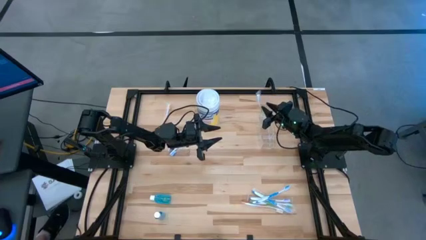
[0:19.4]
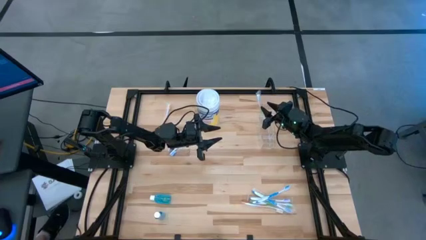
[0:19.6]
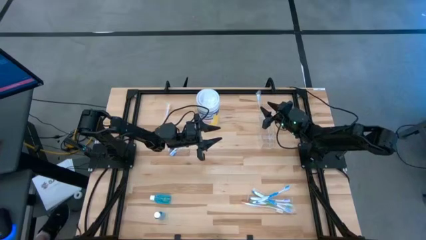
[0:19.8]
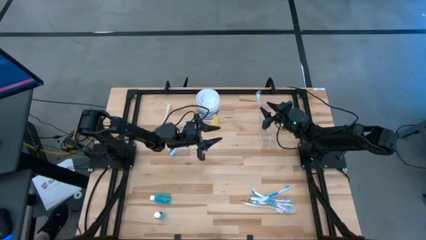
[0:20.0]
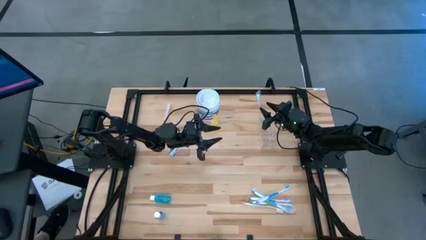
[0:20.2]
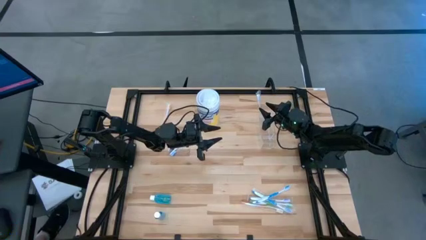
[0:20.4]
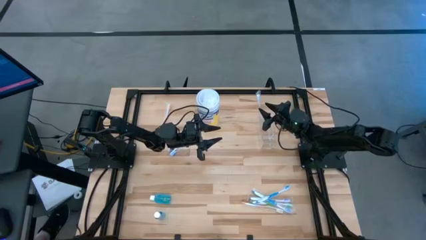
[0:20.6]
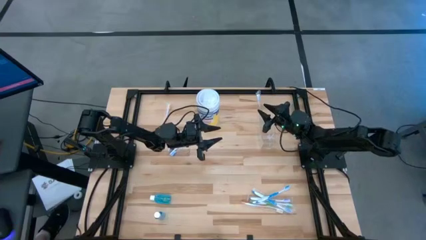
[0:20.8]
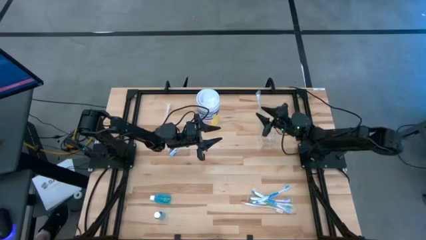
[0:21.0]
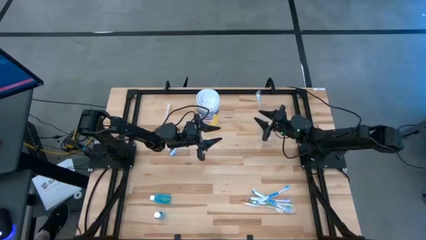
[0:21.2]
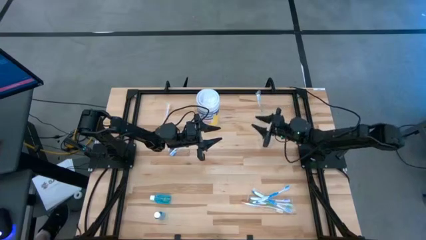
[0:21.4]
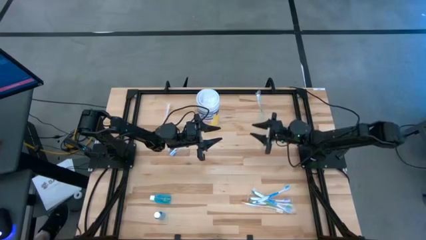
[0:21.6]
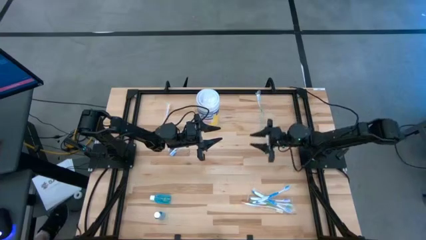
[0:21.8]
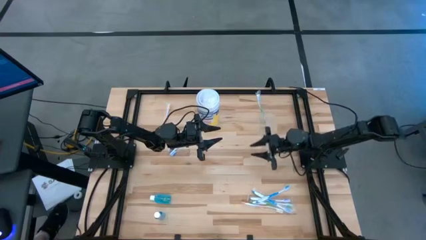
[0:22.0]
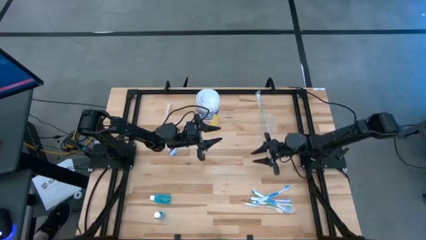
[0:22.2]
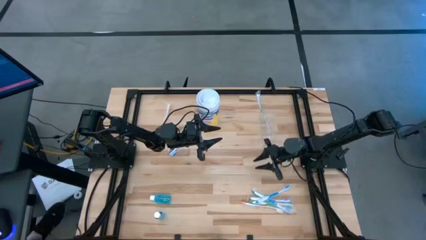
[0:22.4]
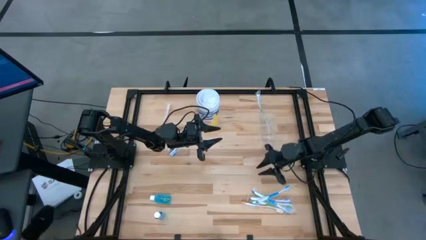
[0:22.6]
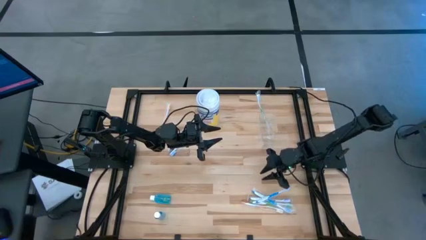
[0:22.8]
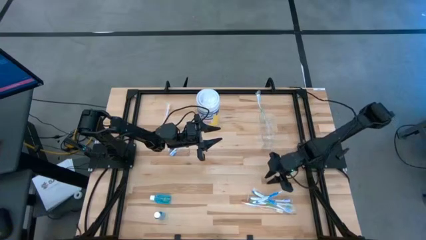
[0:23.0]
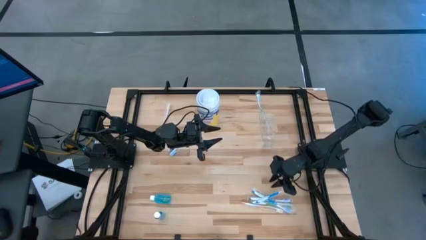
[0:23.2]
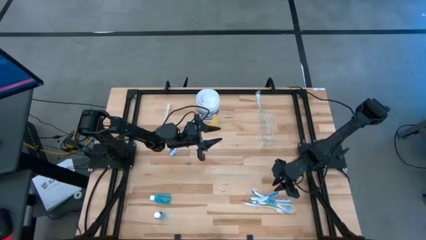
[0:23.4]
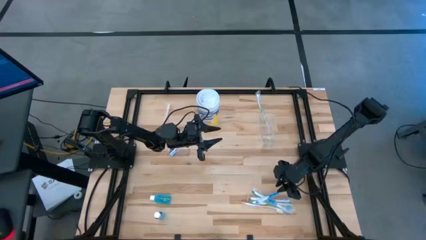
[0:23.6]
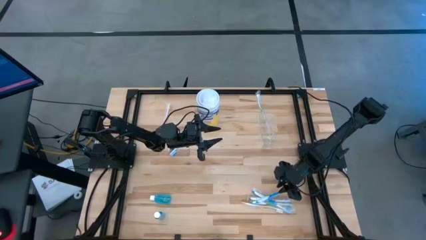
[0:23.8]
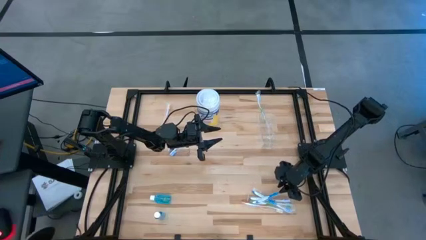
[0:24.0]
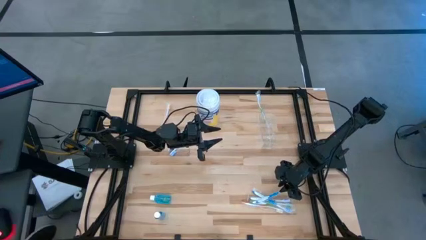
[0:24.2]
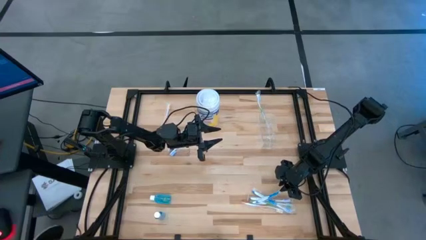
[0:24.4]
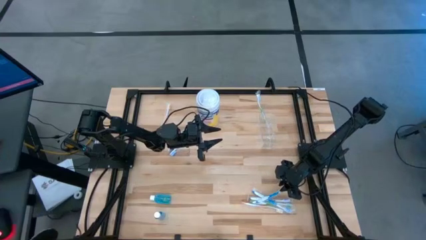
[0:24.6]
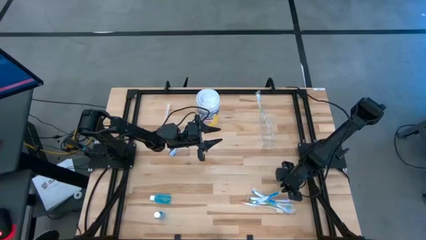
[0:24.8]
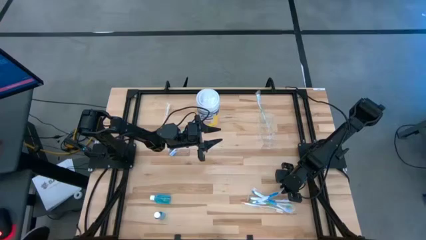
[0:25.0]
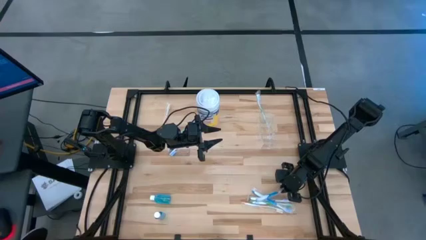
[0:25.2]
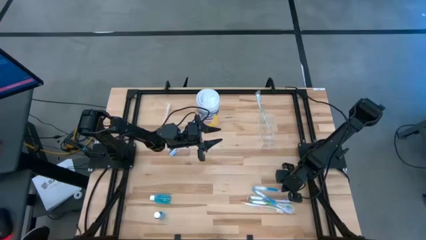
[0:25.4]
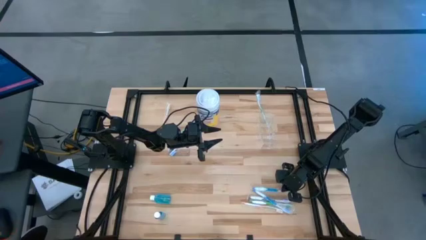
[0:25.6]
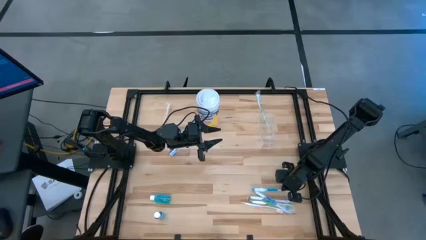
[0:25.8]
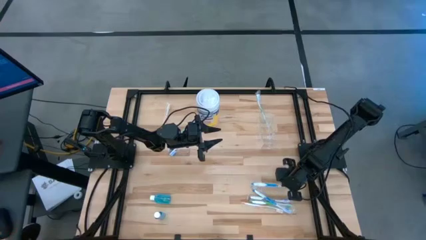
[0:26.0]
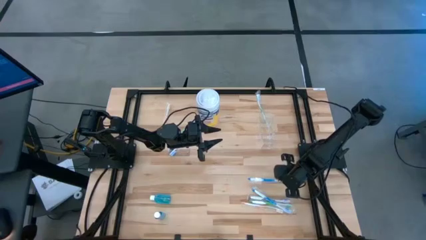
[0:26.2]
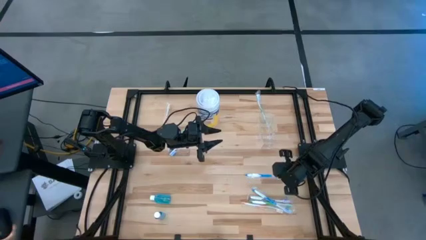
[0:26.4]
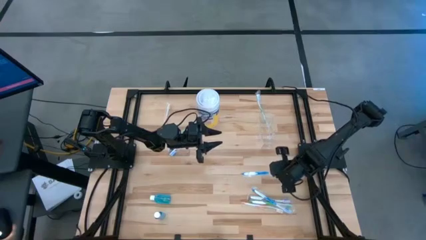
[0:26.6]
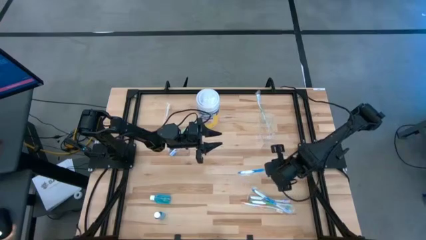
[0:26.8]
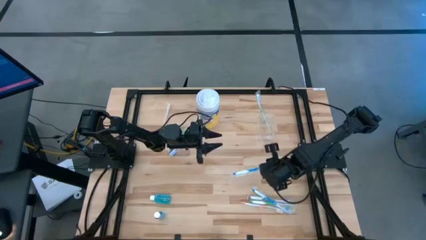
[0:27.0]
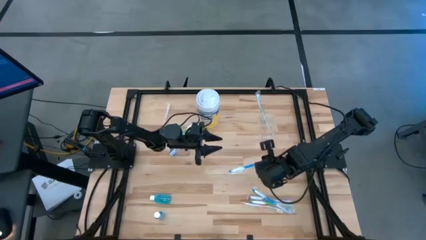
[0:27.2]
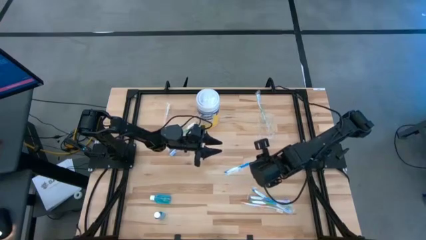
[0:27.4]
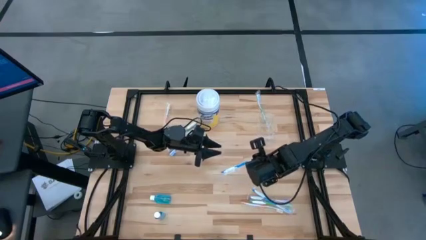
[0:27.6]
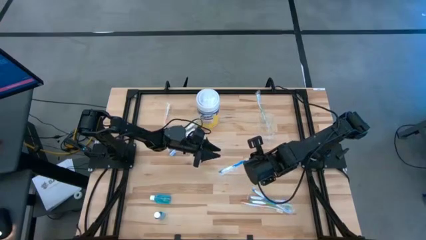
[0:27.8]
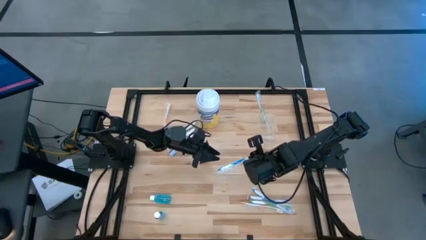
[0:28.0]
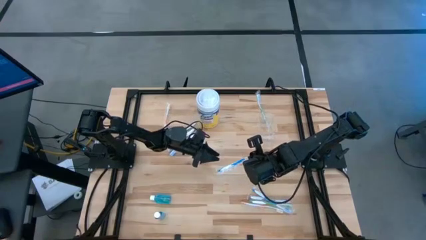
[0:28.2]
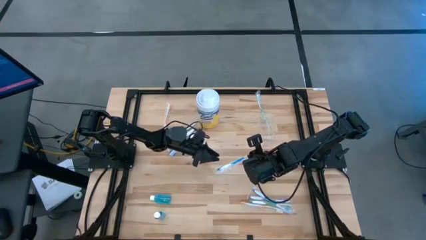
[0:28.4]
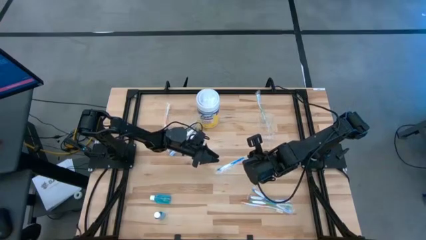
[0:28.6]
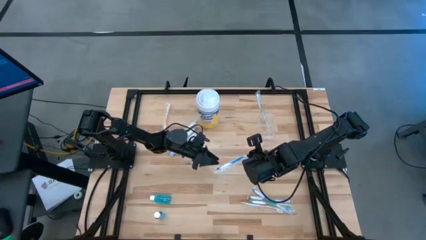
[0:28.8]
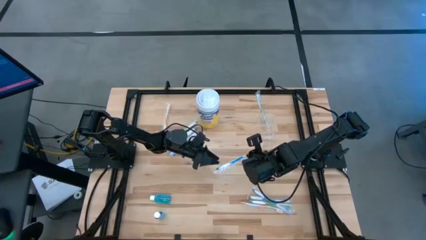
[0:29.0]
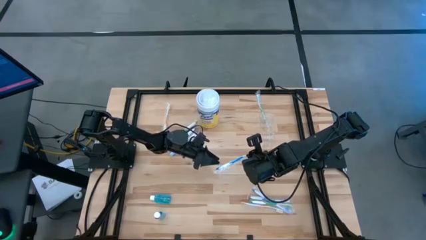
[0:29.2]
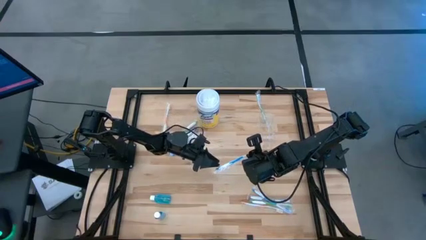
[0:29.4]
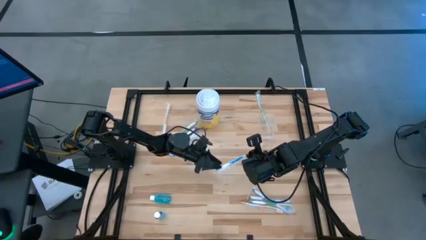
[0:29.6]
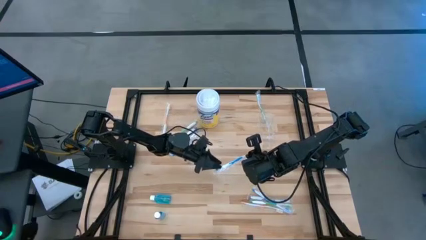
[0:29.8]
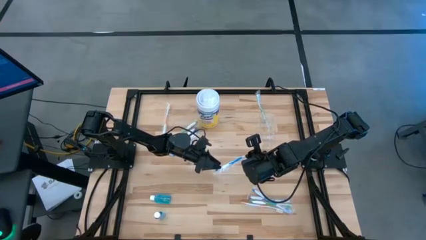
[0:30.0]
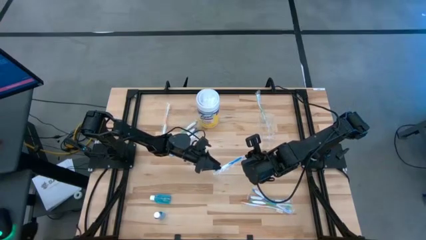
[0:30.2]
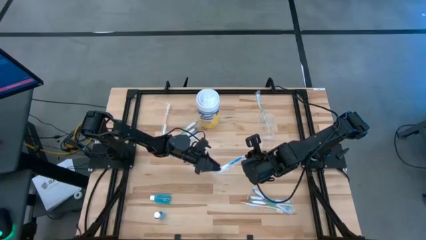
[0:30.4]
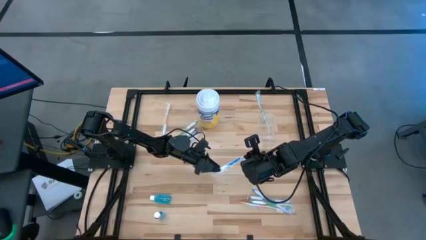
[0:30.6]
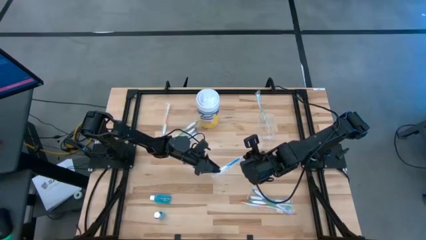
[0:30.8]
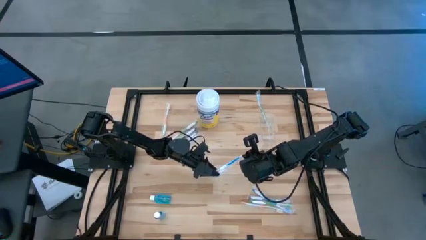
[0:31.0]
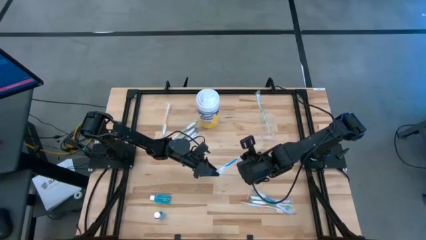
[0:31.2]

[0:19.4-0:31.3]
Task: Pick & Place toothbrushing station
Put the blue toothbrush into the transparent organizer

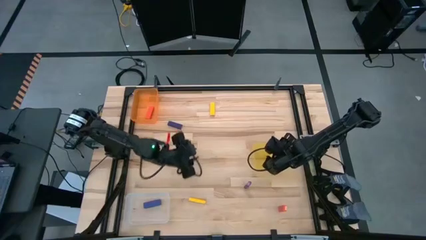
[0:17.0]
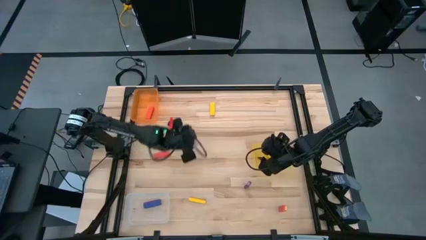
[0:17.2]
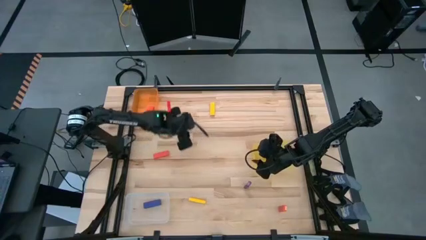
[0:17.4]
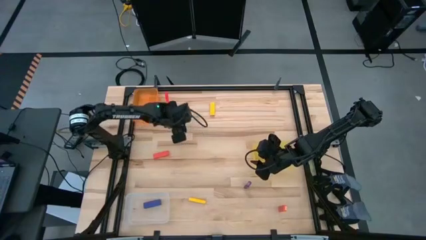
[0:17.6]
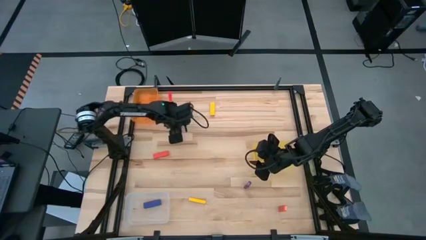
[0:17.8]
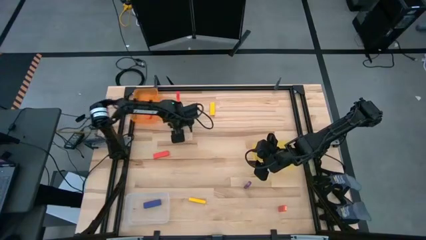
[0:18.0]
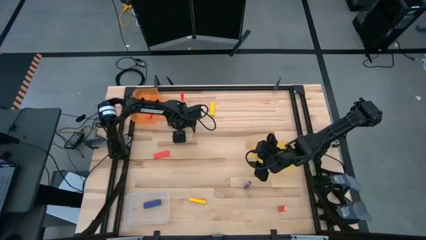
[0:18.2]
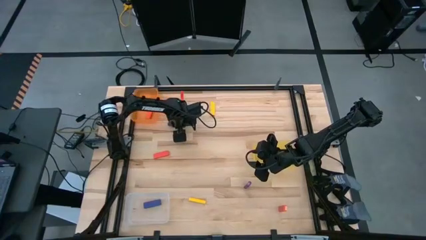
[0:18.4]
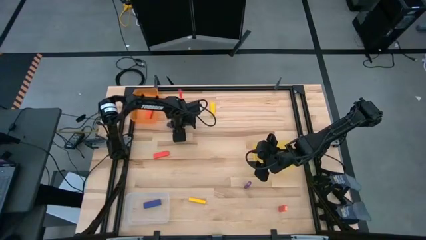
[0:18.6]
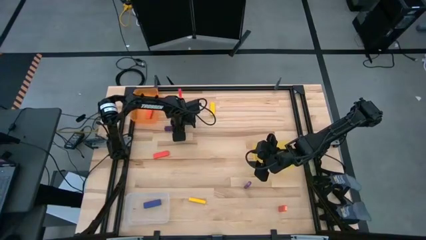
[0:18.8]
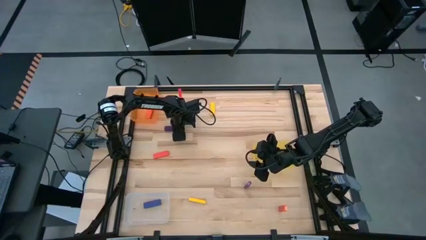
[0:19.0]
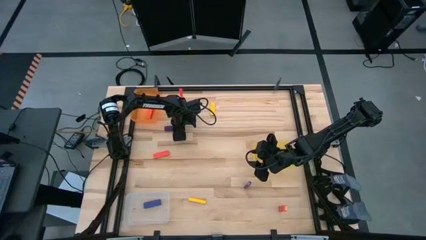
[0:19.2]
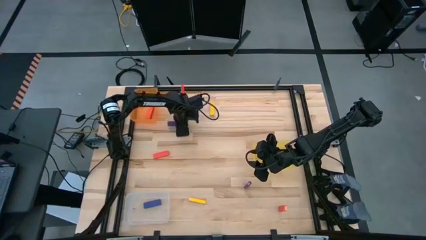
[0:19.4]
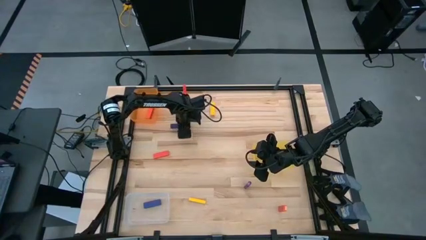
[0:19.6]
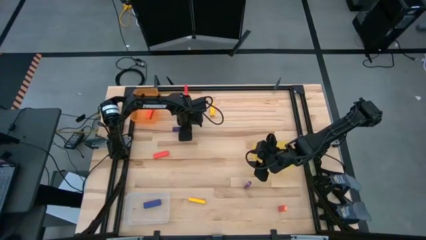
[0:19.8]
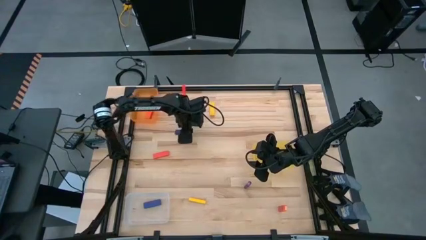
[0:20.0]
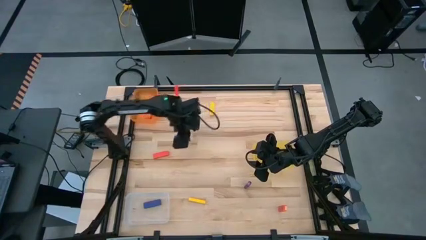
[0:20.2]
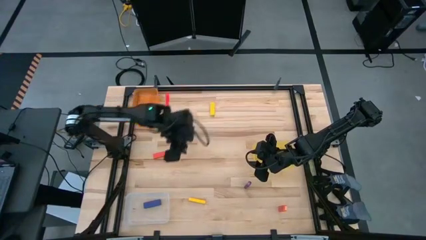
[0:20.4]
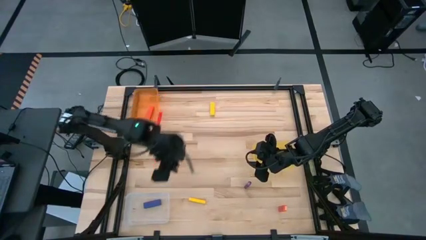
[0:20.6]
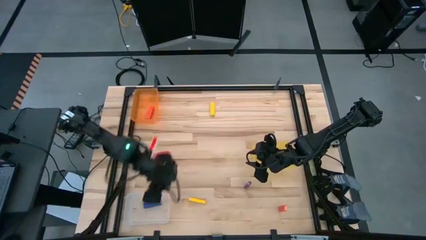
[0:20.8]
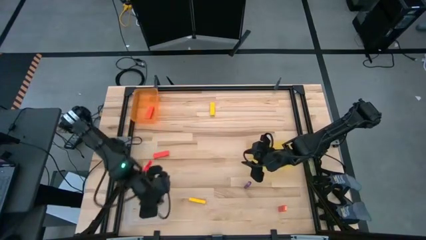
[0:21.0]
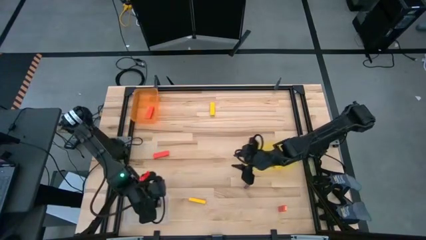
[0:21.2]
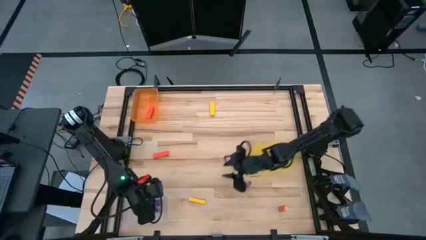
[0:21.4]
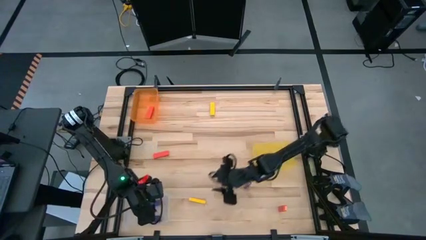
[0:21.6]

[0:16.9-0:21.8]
Task: Sort blocks
Put the top right purple block into the transparent bin

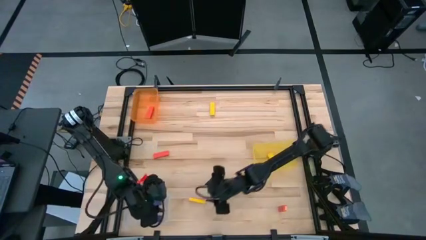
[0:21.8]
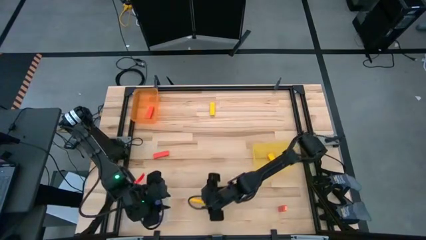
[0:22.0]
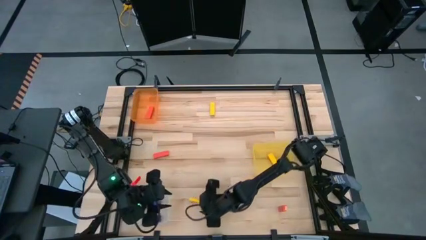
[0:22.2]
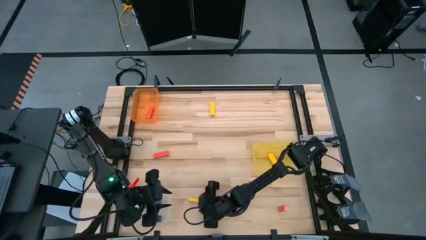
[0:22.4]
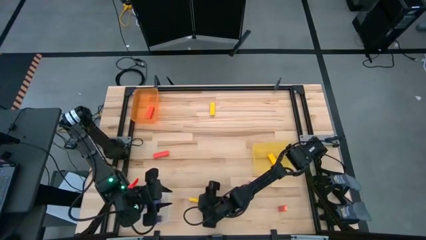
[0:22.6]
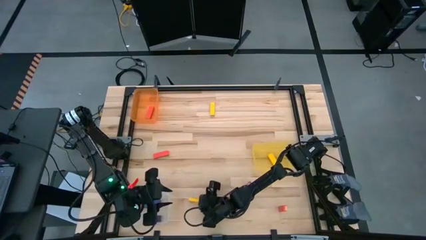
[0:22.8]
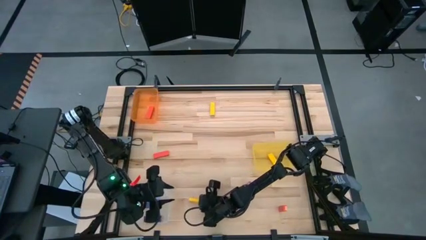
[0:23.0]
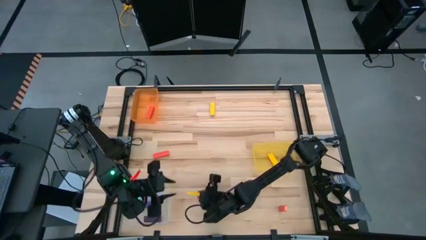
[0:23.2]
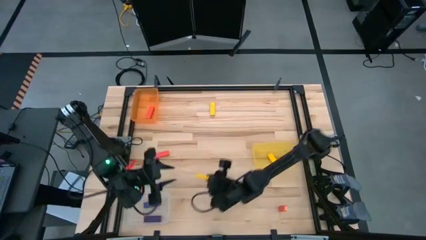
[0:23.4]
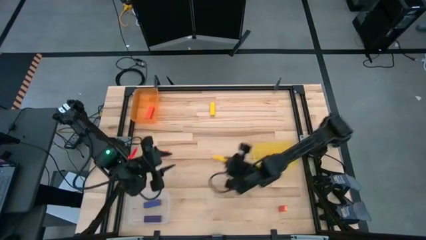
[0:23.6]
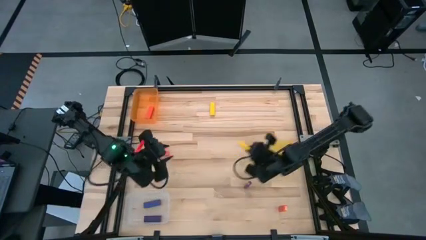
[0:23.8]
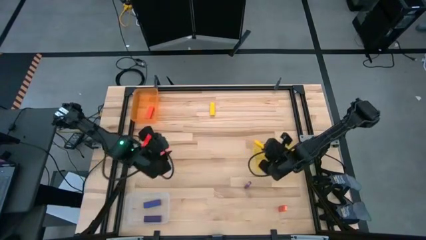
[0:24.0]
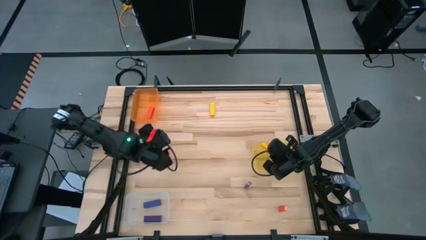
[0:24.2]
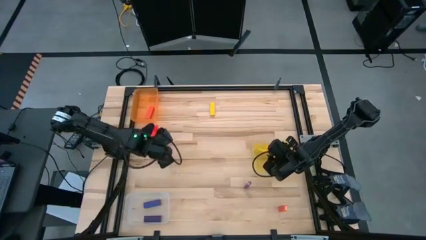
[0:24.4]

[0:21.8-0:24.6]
Put the bottom yellow block into the yellow transparent bin
